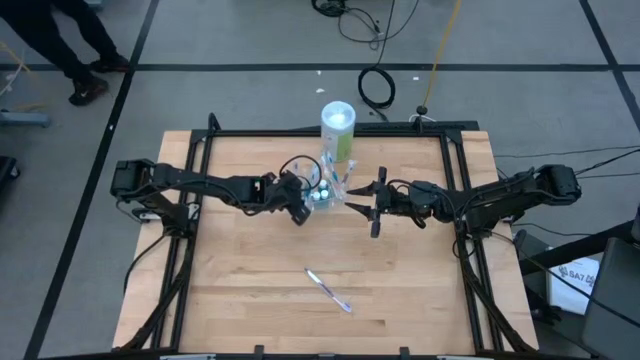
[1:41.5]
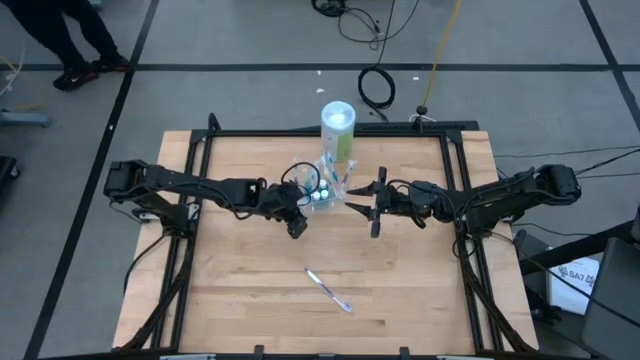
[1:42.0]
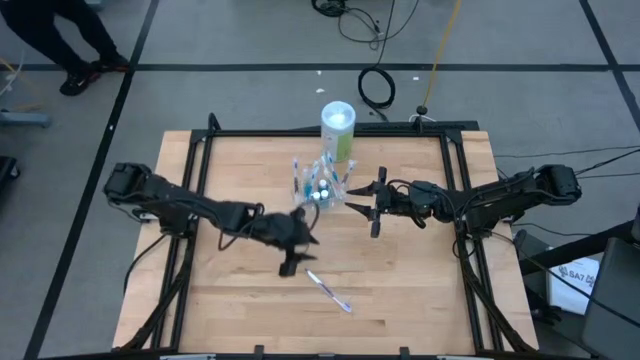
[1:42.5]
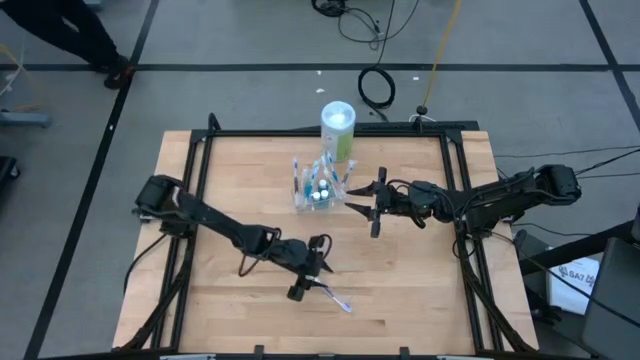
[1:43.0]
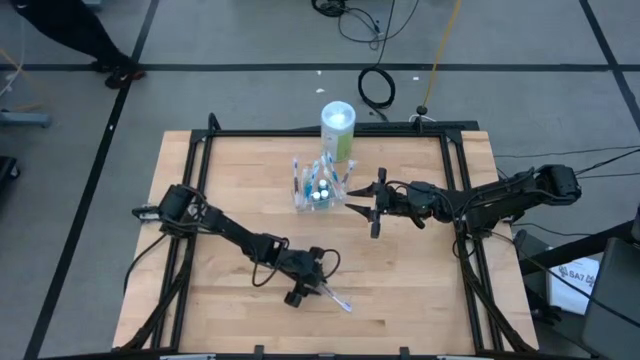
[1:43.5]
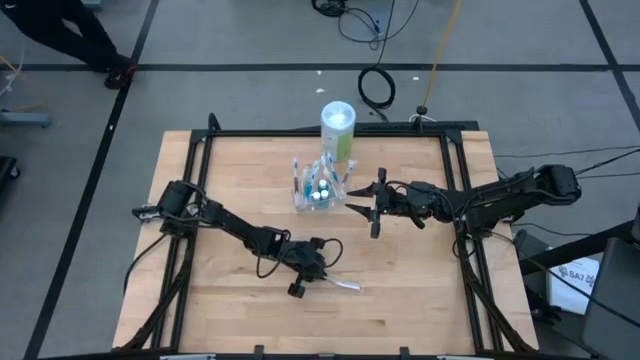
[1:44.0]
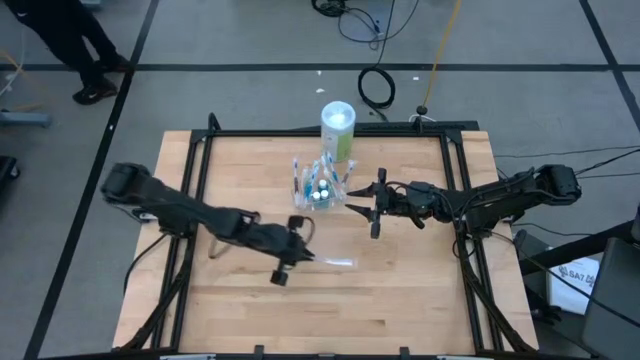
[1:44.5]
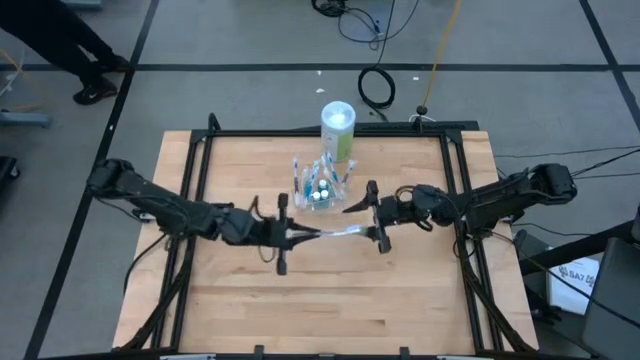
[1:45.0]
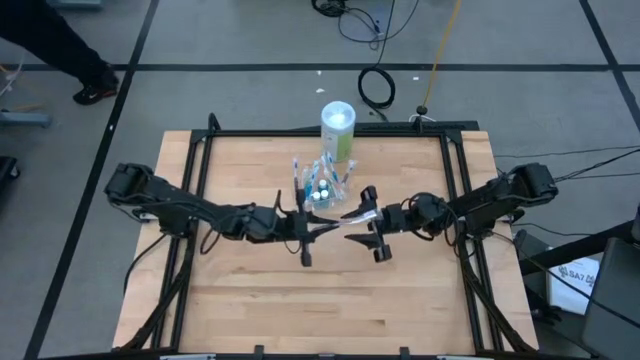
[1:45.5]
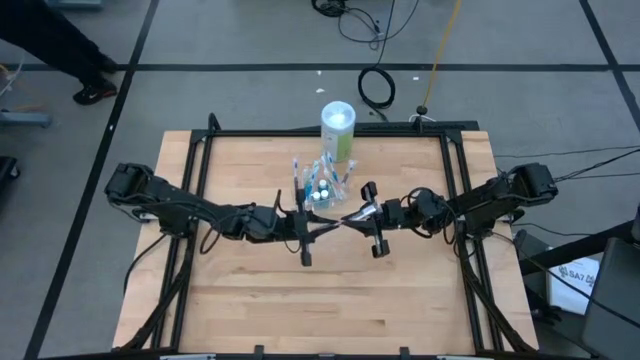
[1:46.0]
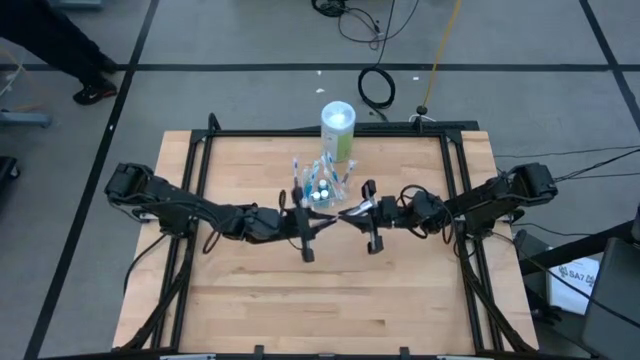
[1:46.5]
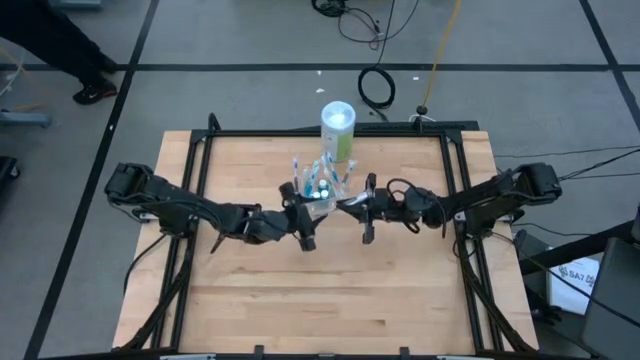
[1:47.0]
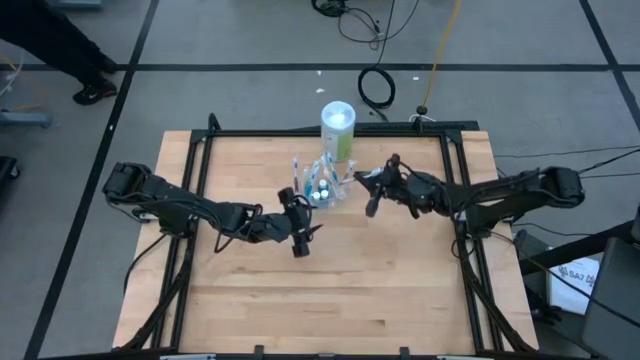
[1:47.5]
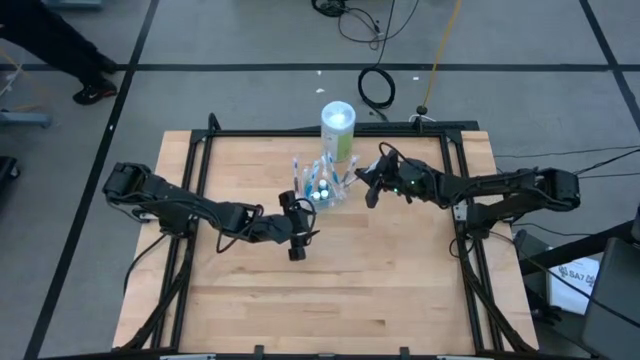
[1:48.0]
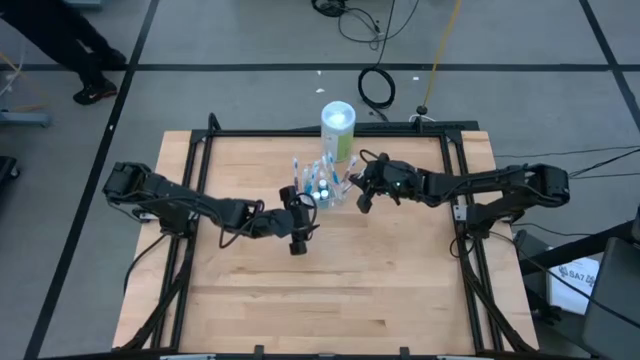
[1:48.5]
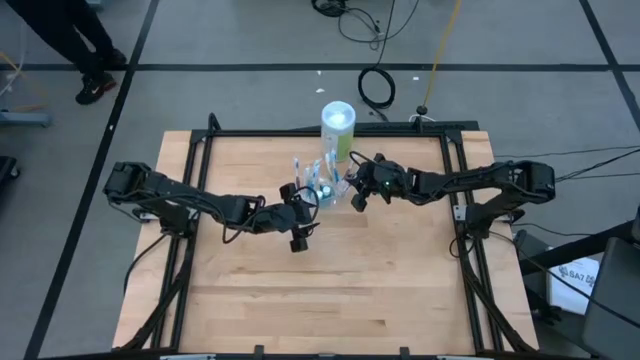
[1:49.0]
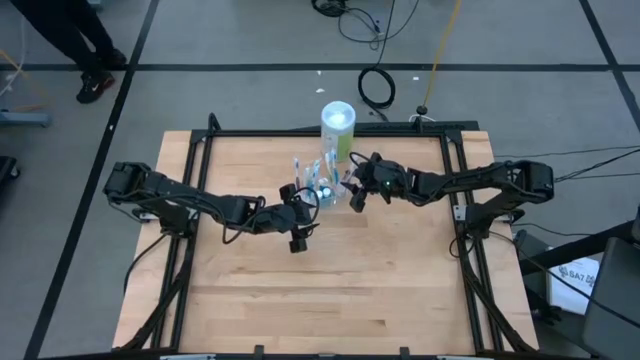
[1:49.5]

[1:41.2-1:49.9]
Task: Pick & Place toothbrushing station
Put the violet toothbrush into the transparent organizer

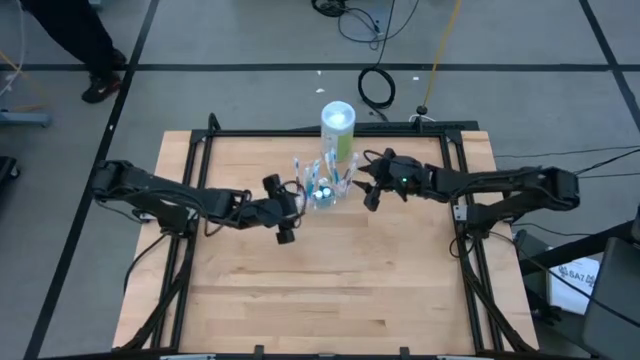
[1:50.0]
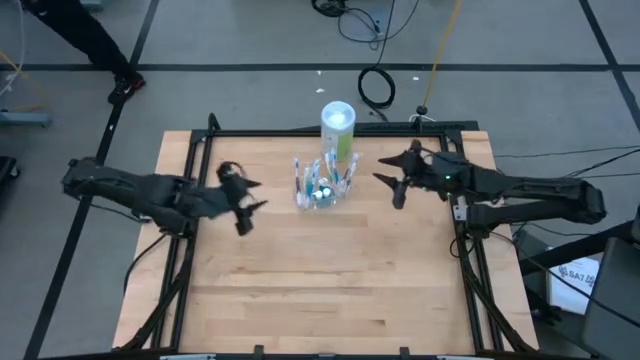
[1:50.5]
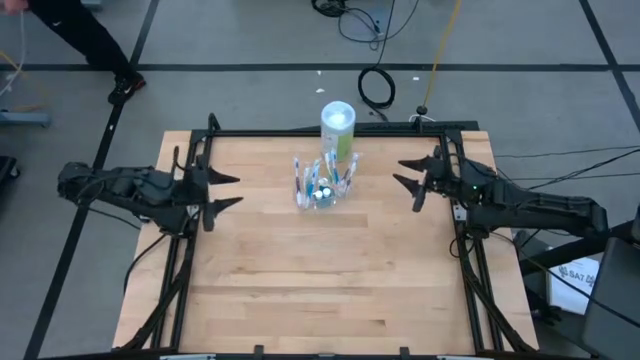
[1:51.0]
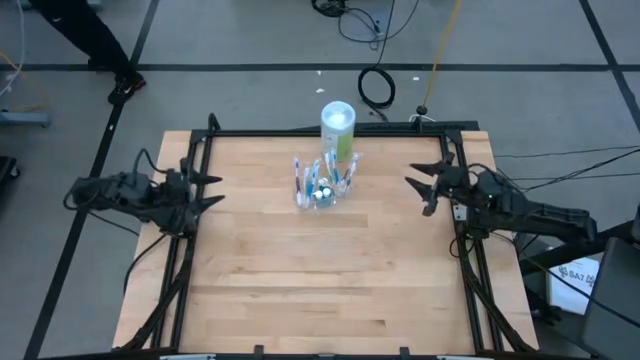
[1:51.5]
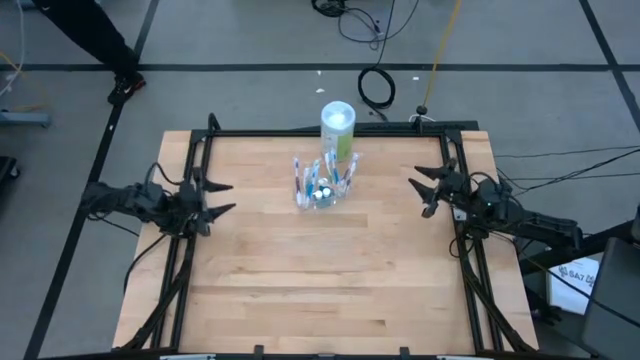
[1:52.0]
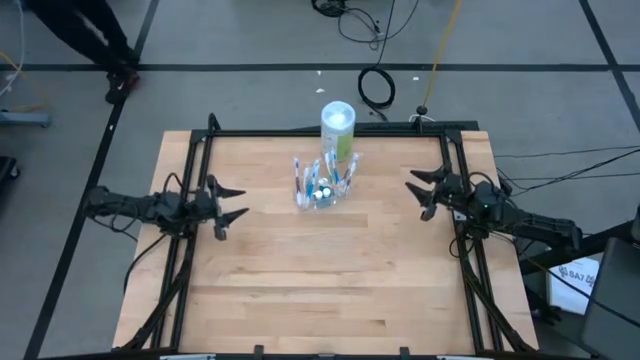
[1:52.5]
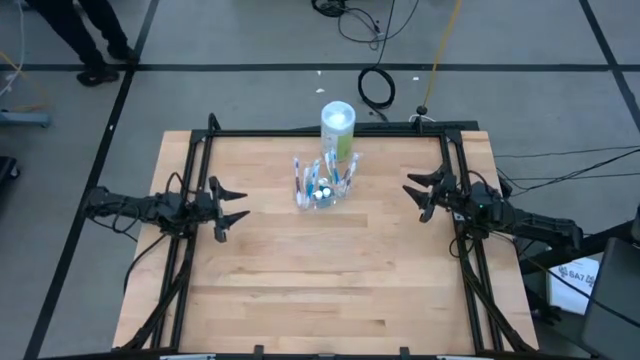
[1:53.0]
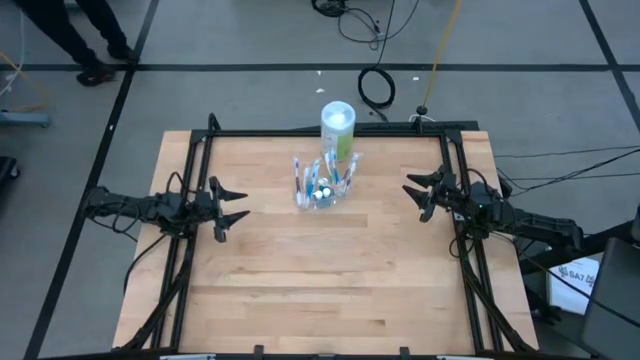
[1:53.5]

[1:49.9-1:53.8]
Return to Home Position

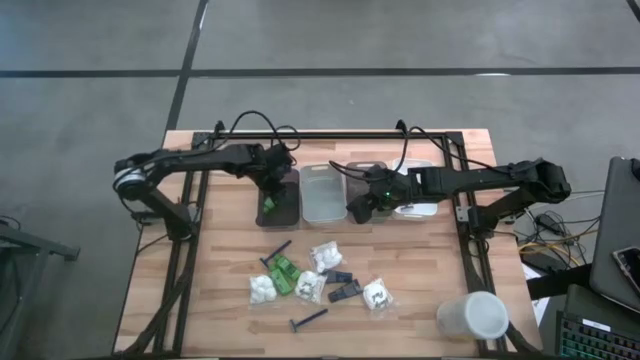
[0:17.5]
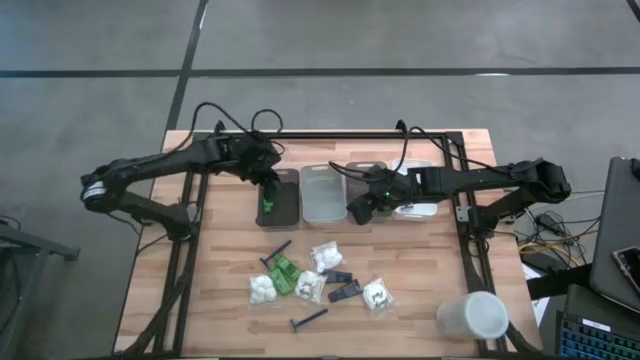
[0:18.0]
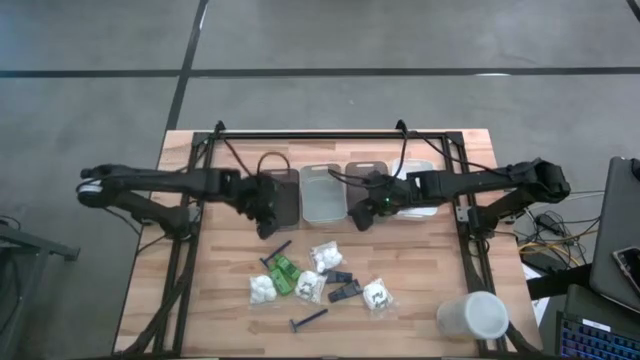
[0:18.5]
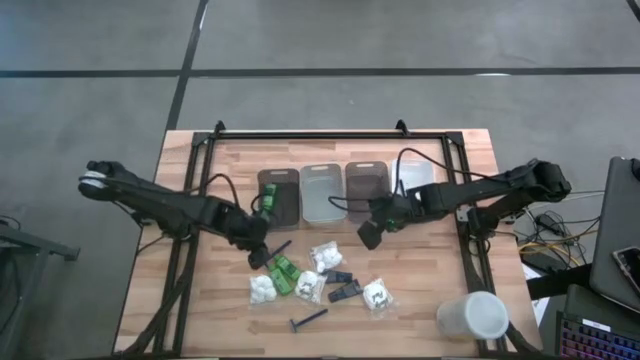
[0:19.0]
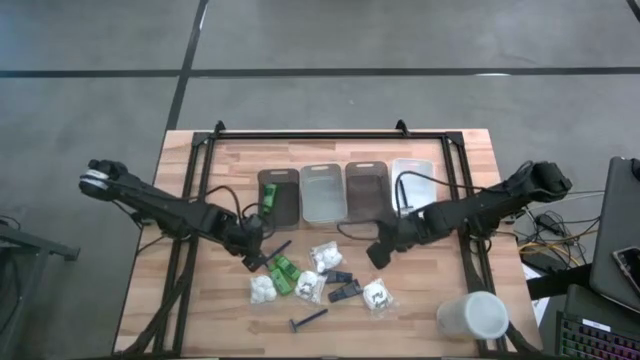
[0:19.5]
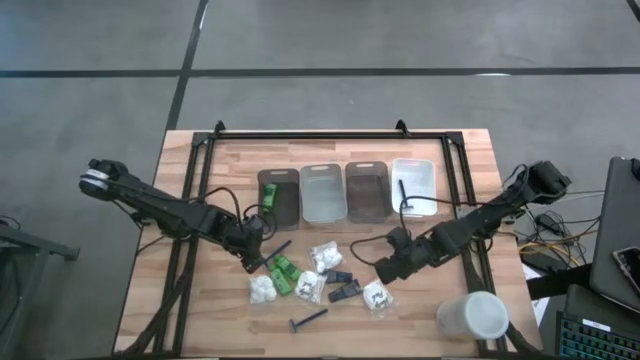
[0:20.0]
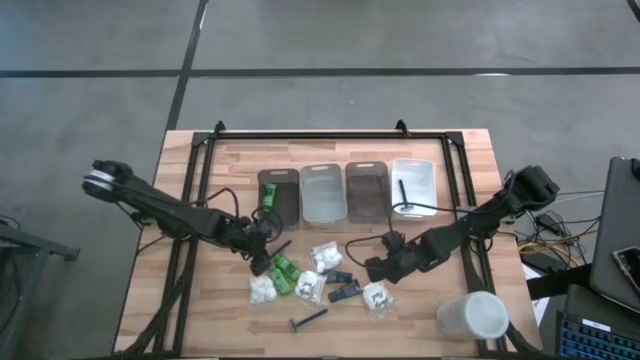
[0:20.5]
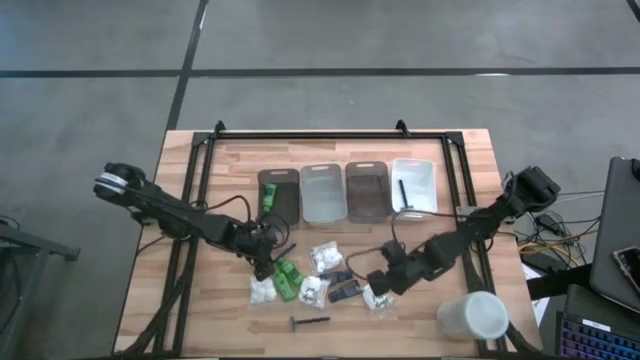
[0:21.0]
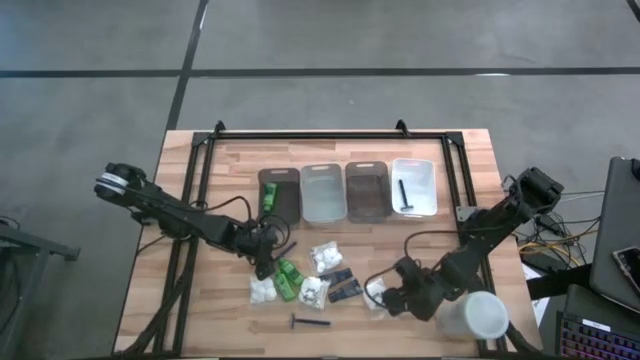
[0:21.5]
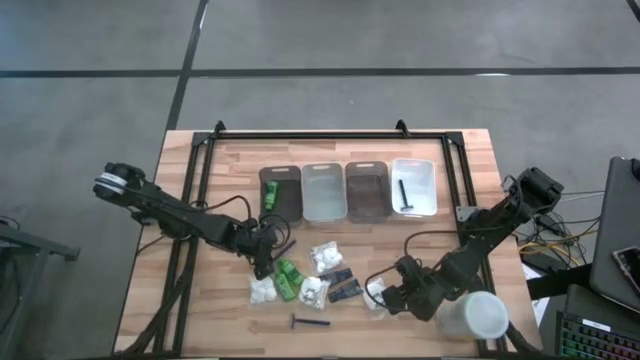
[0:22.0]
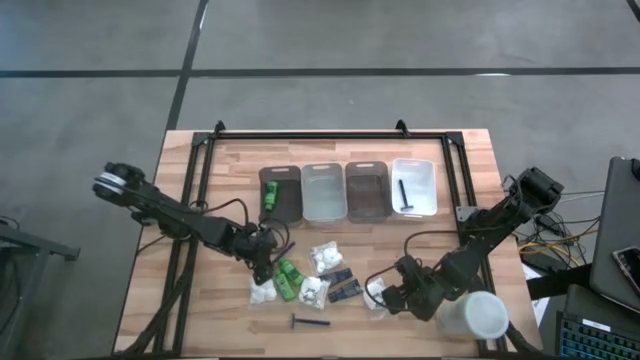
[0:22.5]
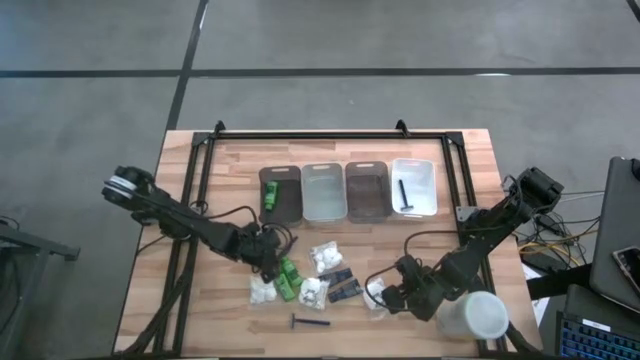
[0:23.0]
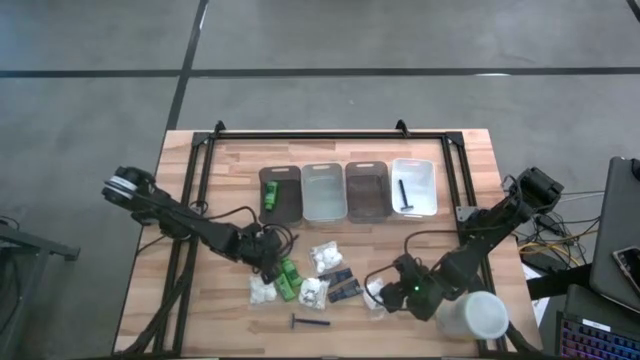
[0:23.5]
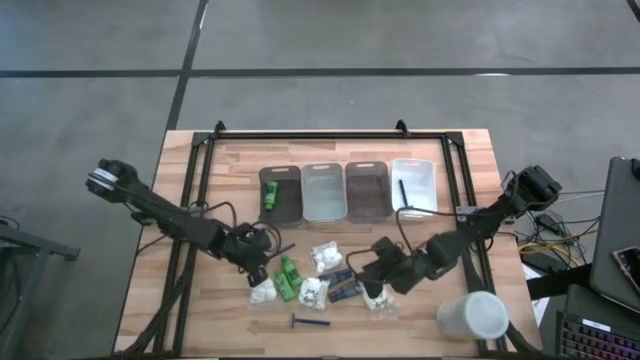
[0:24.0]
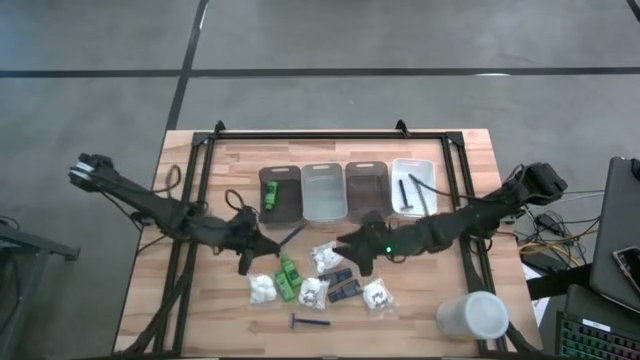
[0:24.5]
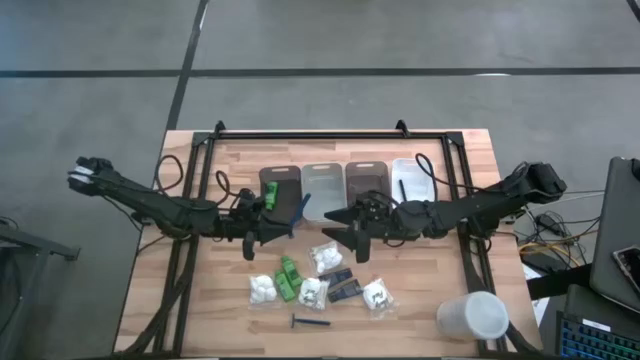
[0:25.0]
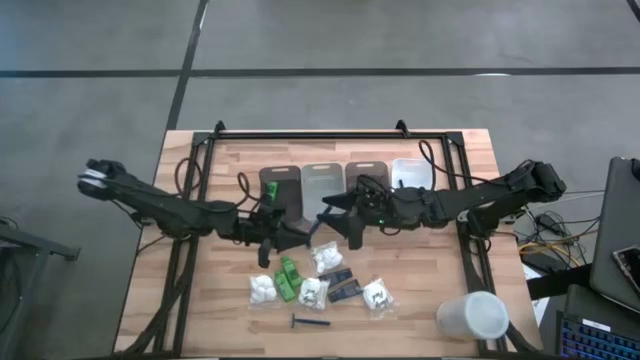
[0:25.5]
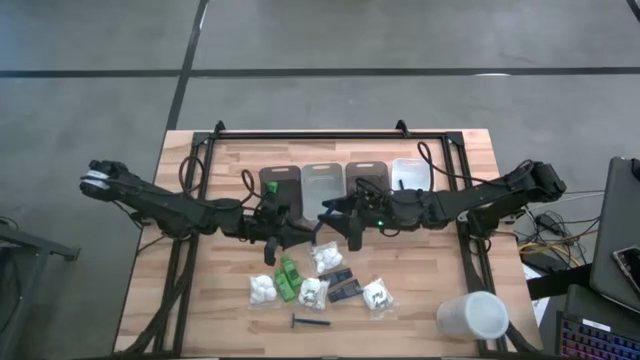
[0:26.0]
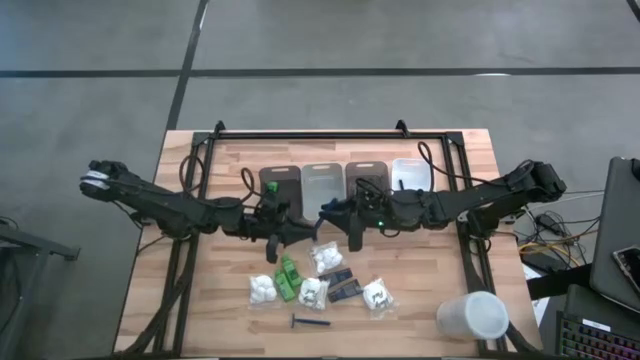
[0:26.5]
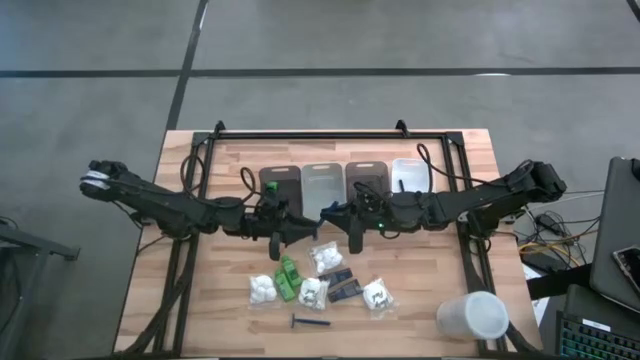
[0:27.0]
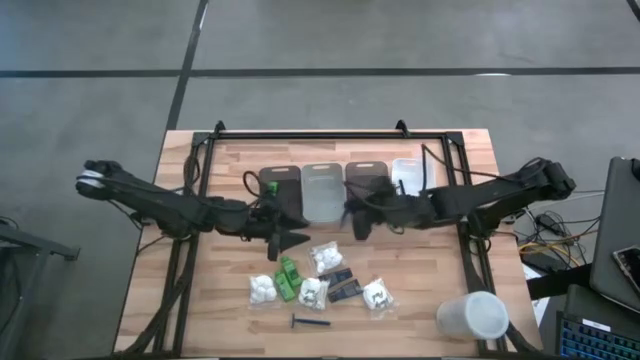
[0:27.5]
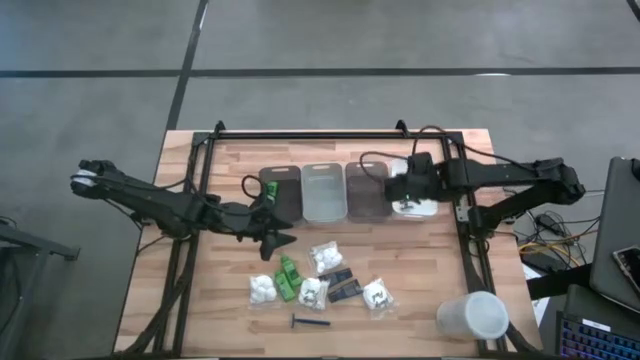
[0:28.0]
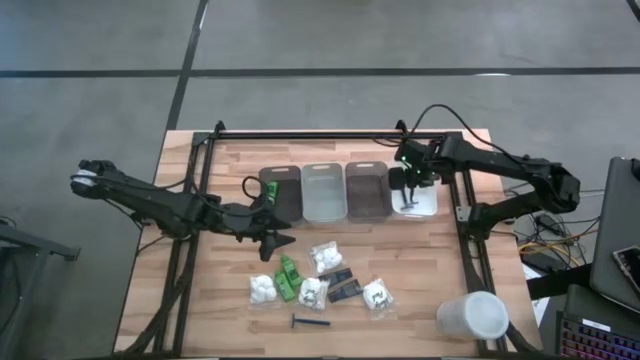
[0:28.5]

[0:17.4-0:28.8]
Task: Pick & Place Travel size toiletries
Put the top razor into the white bin
